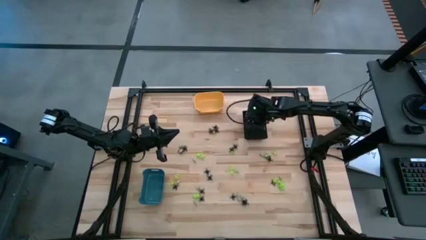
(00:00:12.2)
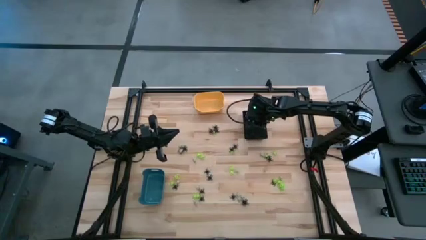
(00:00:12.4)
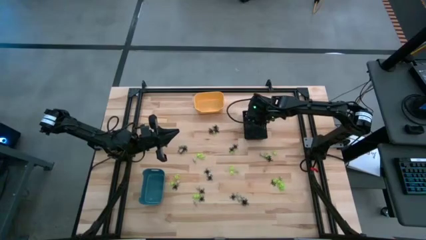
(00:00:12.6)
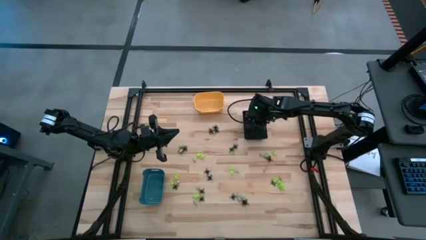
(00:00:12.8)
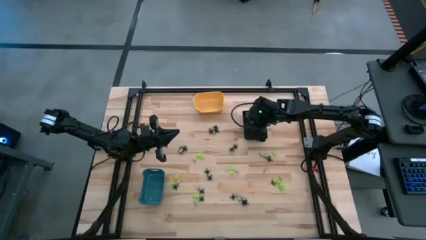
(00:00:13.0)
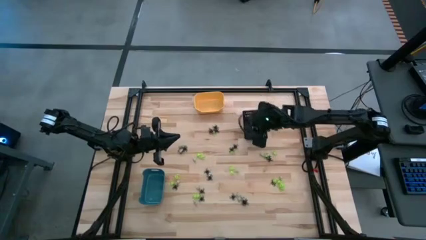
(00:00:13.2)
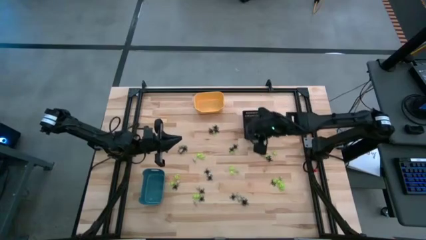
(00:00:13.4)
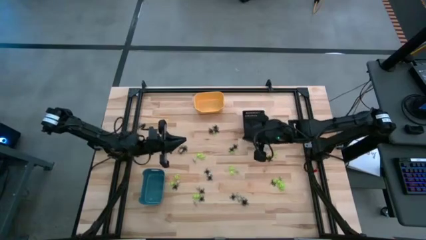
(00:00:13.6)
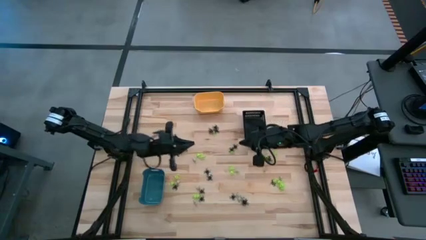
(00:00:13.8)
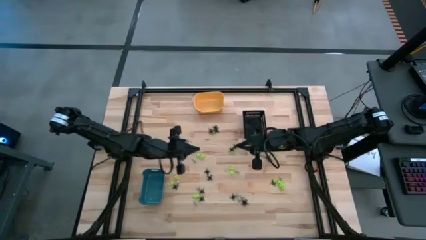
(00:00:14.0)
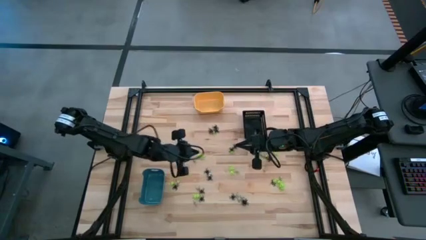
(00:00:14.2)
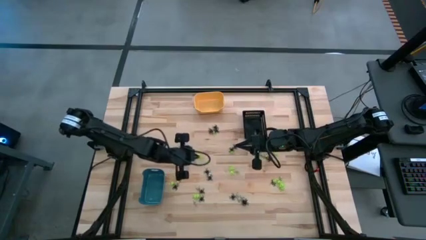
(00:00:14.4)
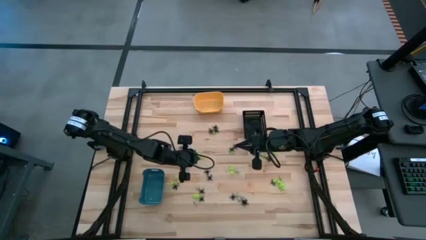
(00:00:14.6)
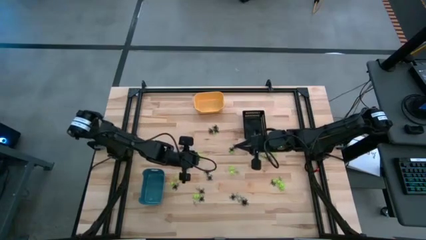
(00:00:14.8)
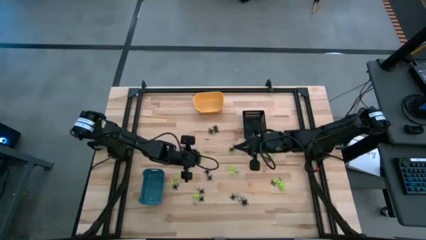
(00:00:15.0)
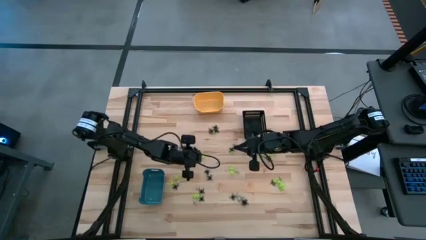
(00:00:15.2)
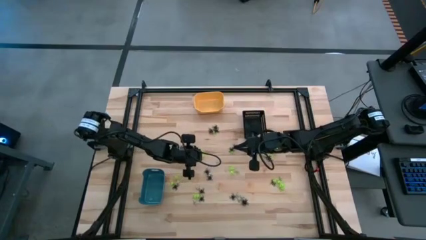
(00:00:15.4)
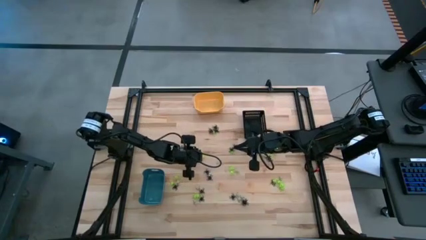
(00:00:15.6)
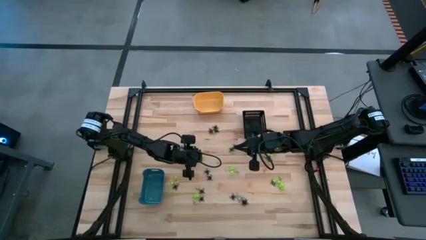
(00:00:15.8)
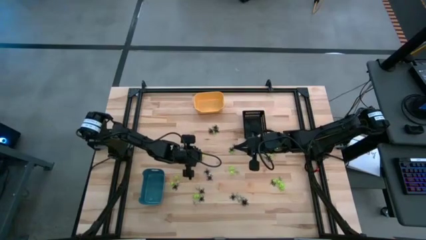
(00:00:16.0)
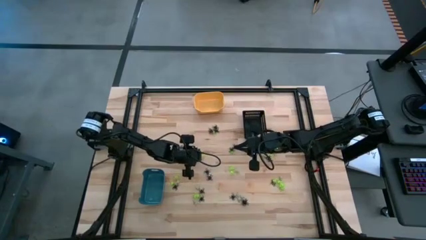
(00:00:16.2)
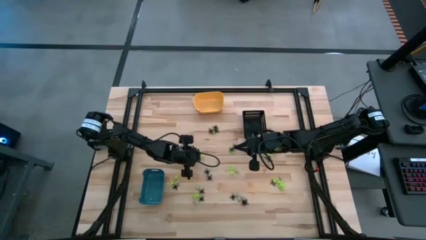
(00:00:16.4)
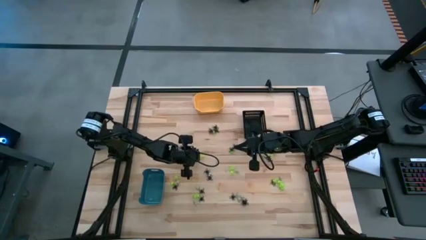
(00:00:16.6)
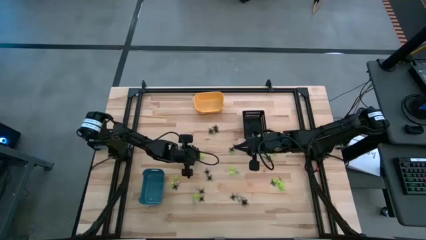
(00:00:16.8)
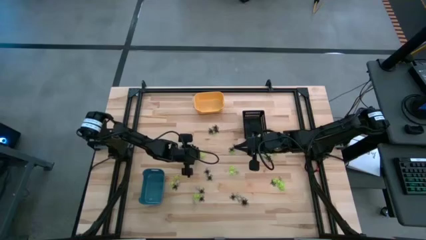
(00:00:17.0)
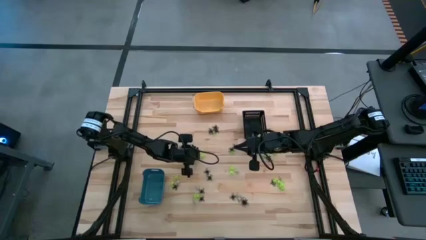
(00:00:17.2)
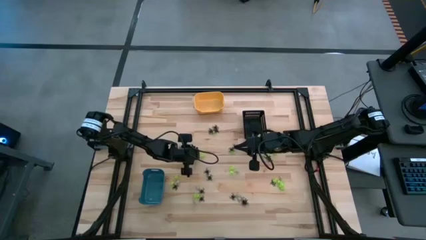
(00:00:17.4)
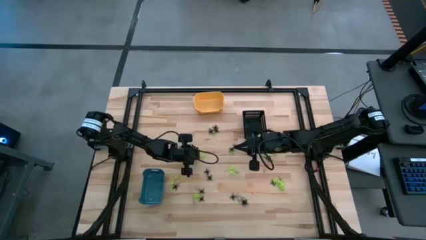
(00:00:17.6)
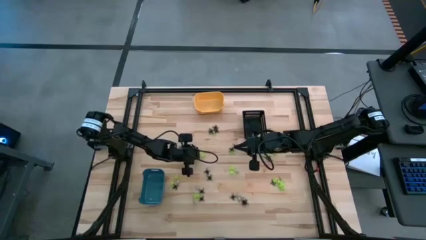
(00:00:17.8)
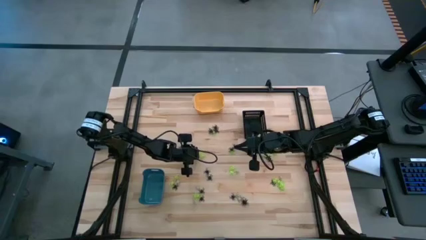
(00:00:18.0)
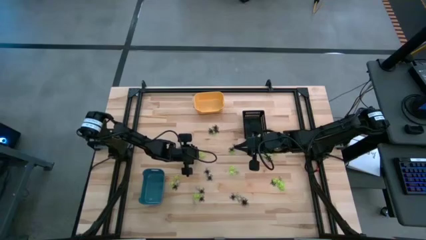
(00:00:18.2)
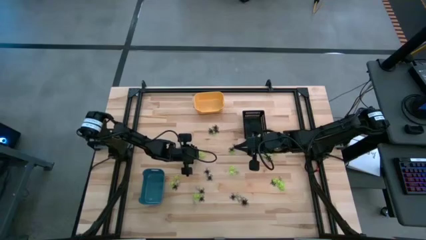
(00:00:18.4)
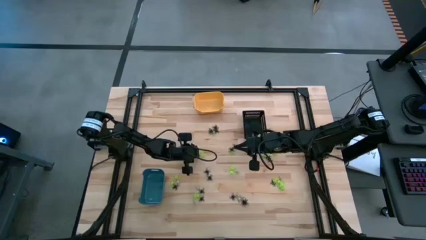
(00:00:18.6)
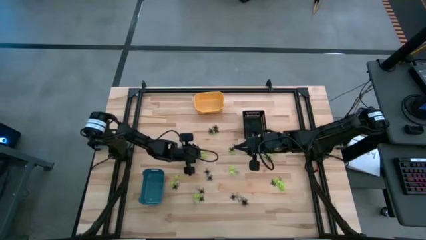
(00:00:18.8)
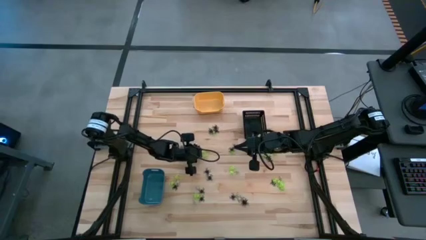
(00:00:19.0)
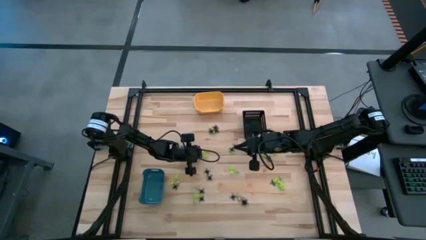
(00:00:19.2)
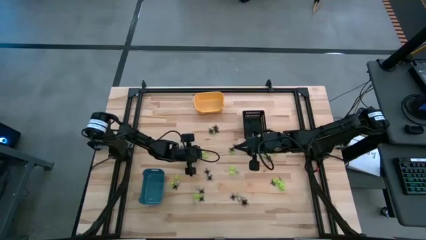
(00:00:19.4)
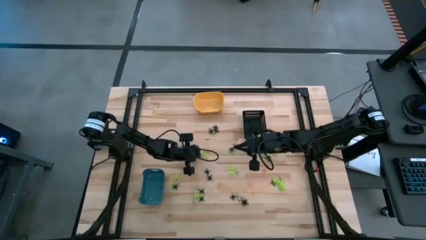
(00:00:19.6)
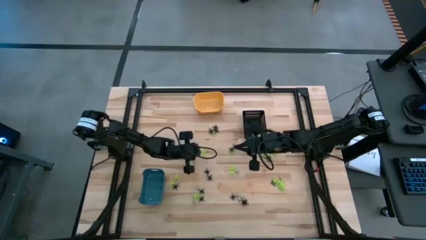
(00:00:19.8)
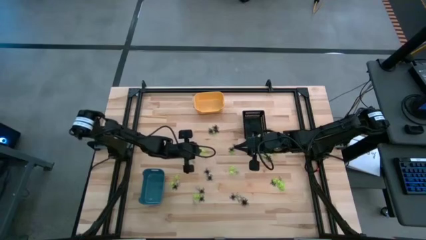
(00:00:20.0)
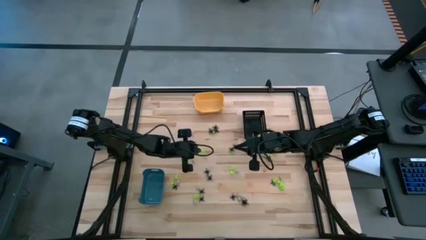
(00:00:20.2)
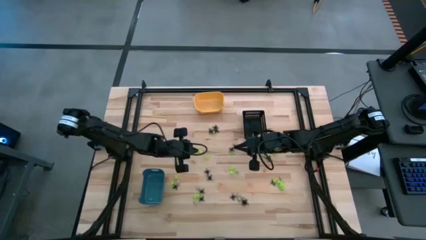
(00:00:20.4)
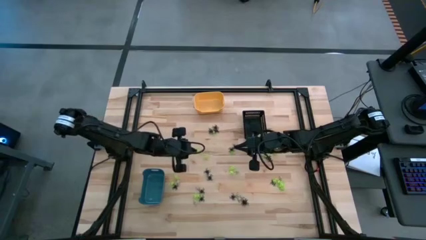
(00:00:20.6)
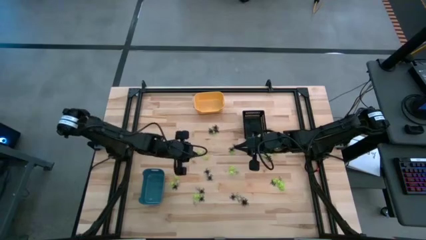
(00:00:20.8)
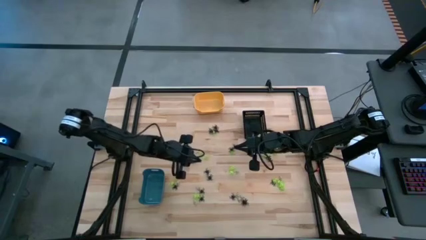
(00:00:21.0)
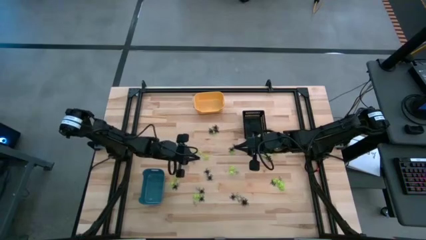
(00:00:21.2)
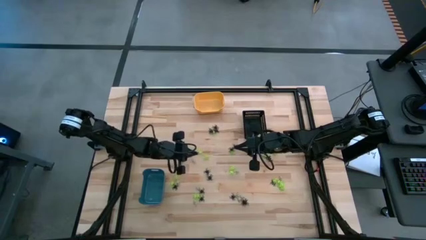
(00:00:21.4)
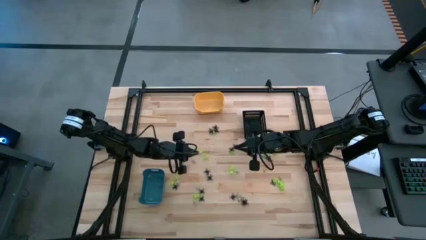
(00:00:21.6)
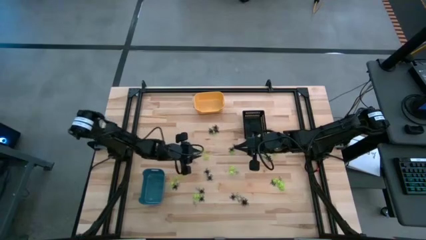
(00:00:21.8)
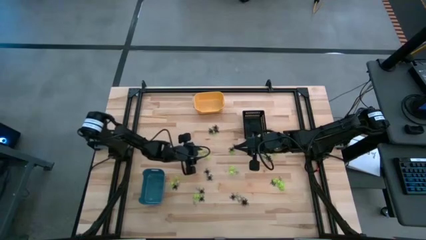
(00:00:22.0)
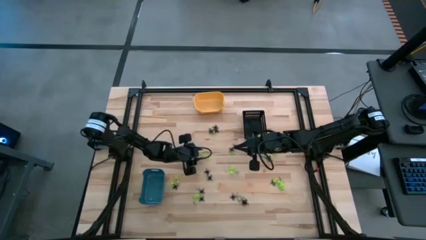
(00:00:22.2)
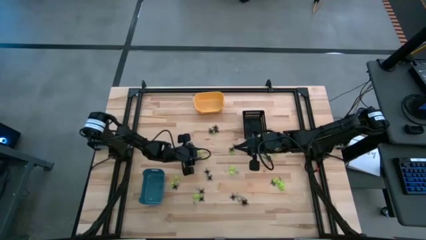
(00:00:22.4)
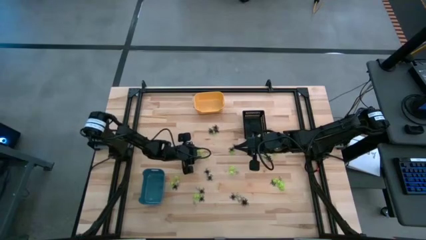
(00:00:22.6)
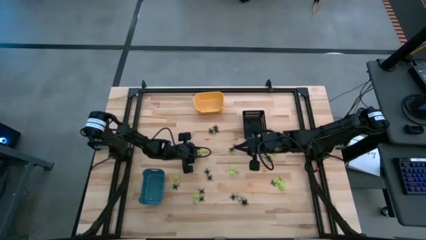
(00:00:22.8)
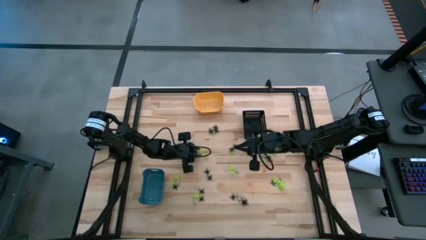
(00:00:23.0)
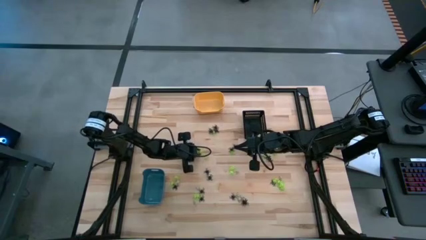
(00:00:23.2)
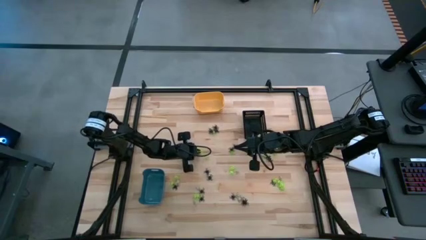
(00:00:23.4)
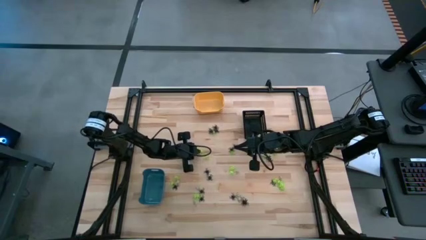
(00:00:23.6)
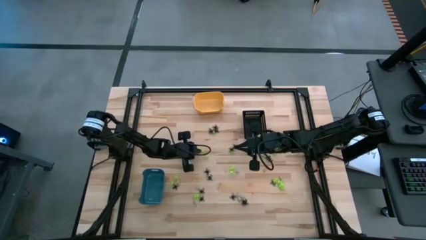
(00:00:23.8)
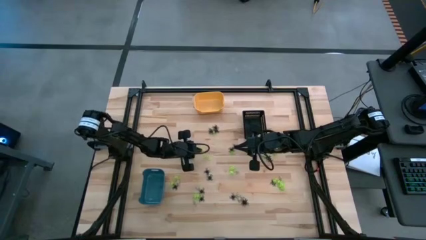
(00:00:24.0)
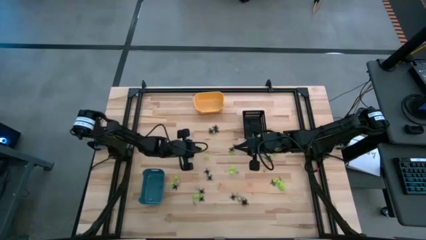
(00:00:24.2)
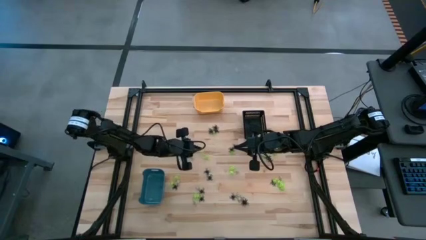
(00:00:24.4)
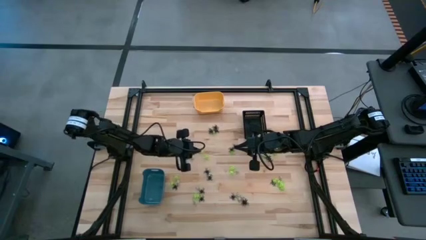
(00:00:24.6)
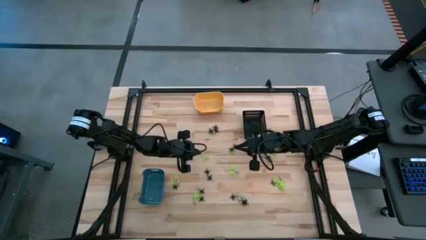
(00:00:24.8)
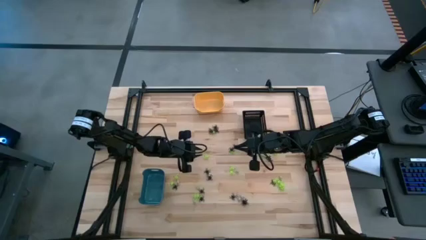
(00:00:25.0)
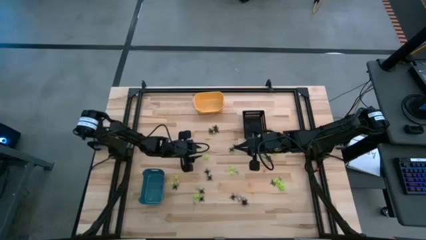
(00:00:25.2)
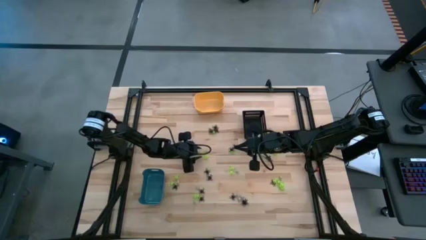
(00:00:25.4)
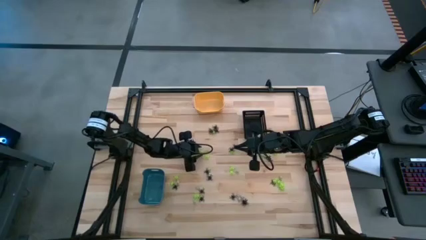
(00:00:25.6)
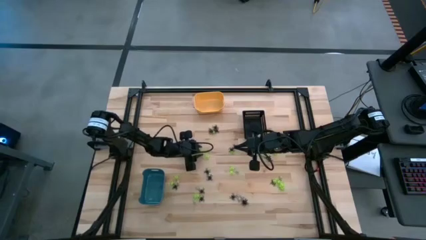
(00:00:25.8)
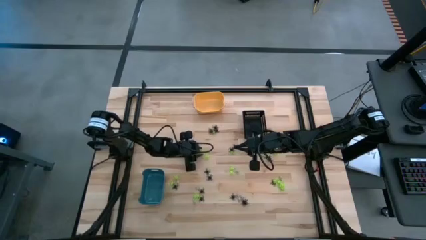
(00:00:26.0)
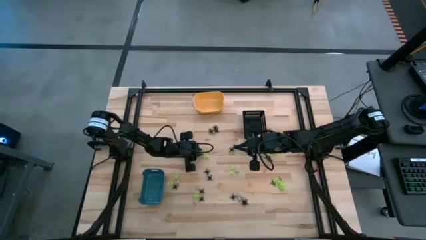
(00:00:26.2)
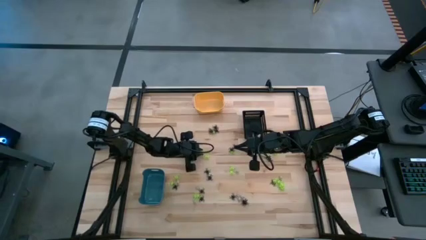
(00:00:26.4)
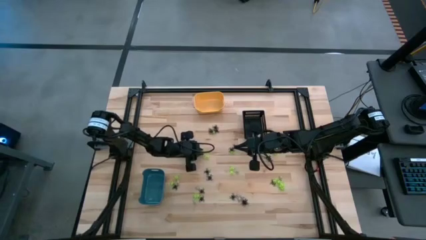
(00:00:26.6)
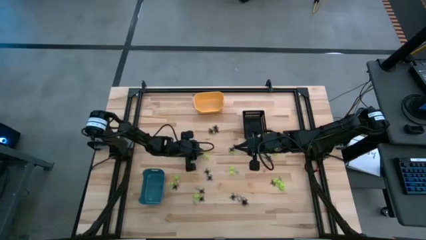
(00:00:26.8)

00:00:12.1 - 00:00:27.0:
Task: Sort Halloween decoration
Put the green spider toy into the blue bin
